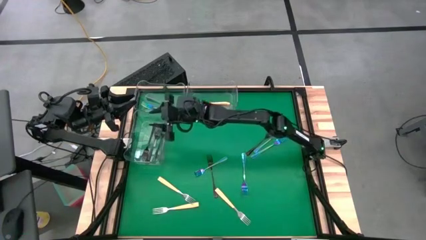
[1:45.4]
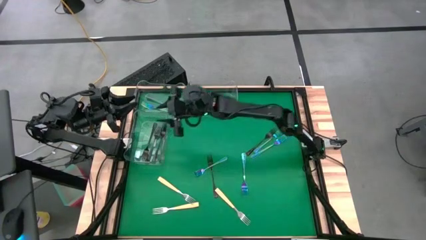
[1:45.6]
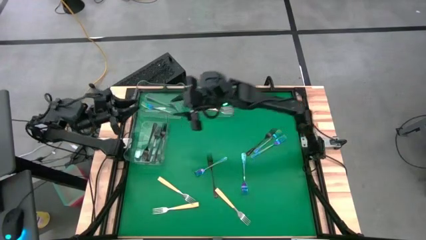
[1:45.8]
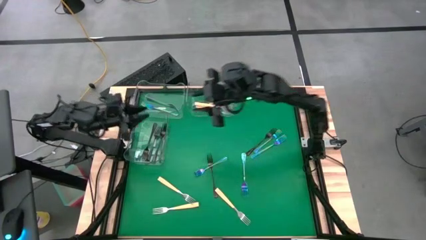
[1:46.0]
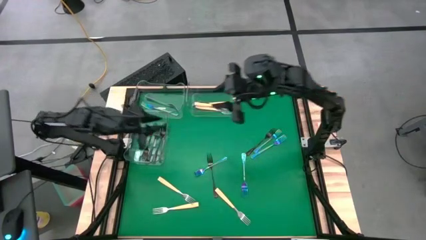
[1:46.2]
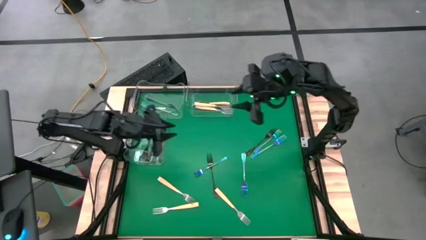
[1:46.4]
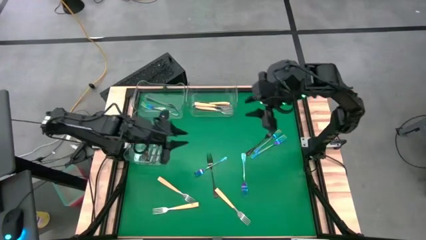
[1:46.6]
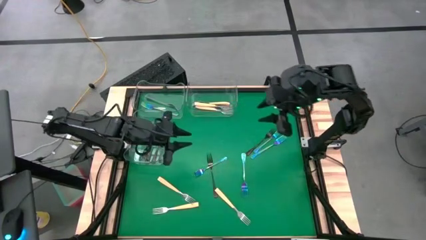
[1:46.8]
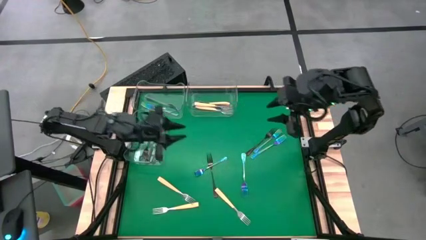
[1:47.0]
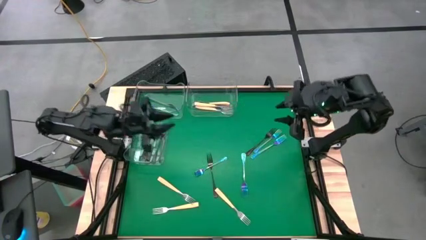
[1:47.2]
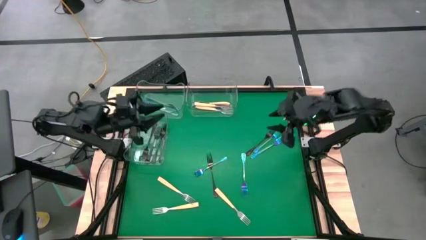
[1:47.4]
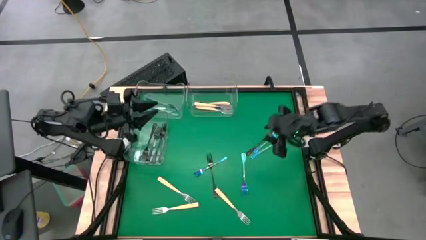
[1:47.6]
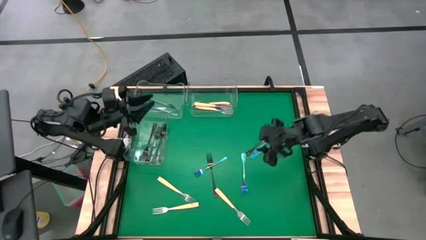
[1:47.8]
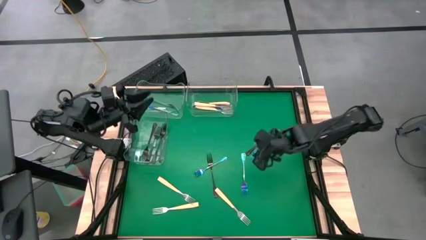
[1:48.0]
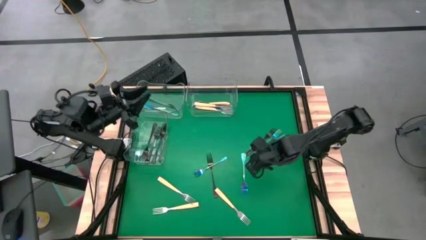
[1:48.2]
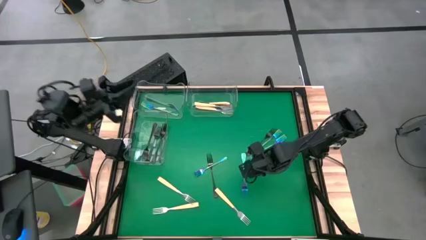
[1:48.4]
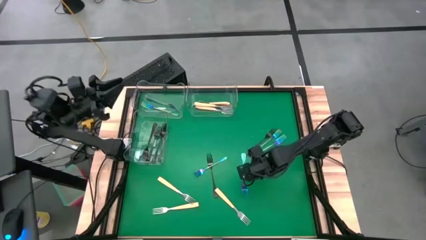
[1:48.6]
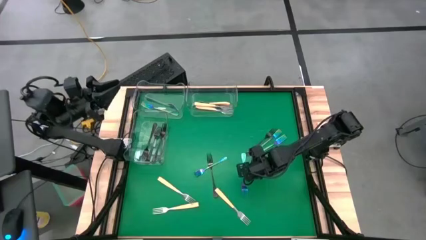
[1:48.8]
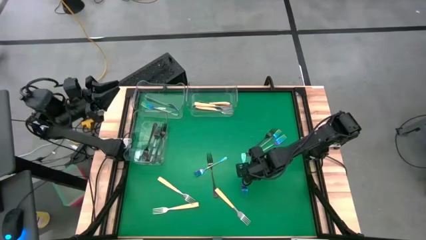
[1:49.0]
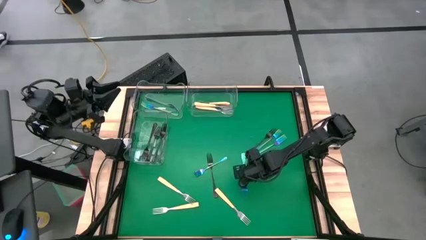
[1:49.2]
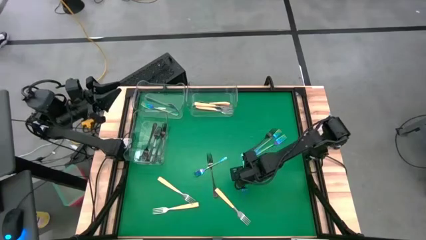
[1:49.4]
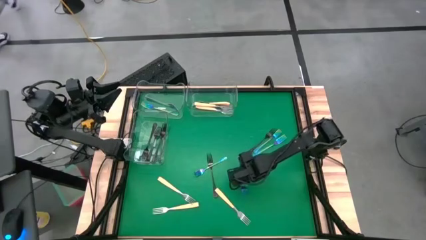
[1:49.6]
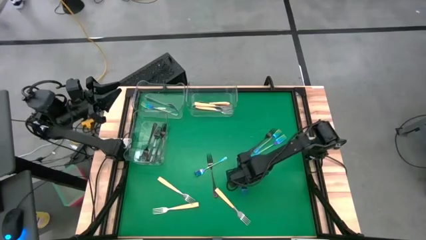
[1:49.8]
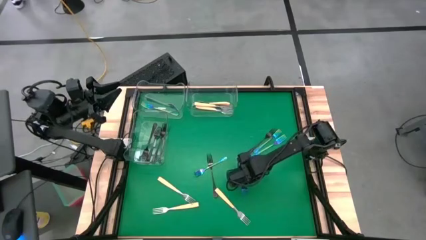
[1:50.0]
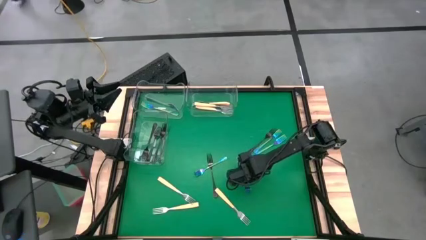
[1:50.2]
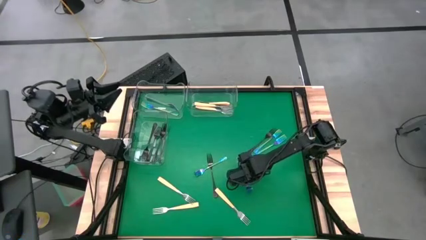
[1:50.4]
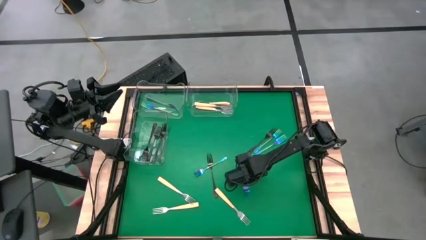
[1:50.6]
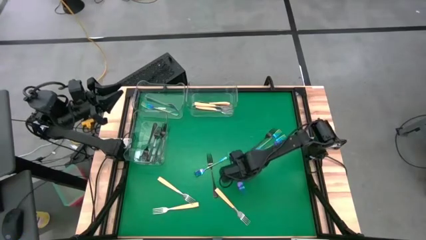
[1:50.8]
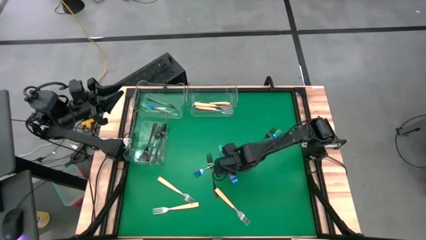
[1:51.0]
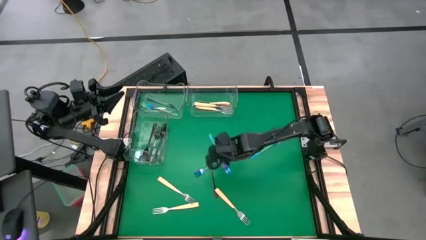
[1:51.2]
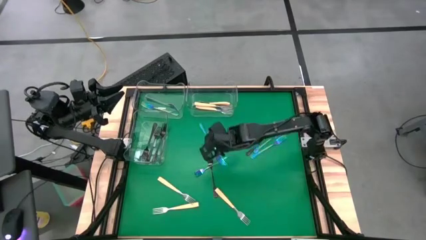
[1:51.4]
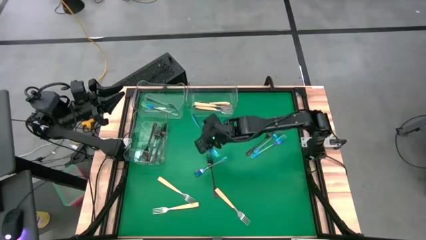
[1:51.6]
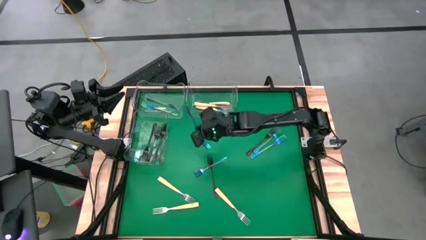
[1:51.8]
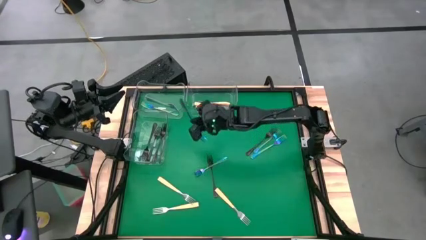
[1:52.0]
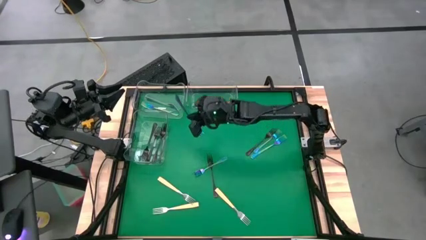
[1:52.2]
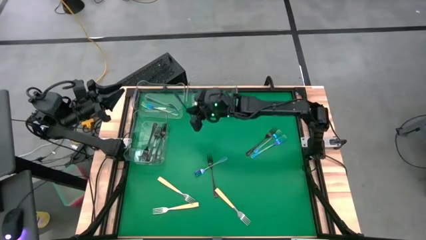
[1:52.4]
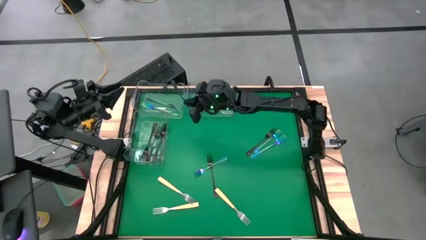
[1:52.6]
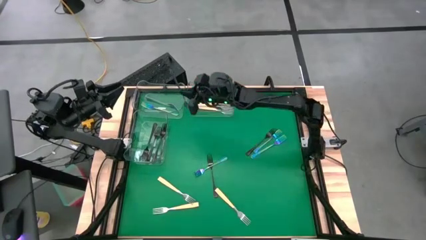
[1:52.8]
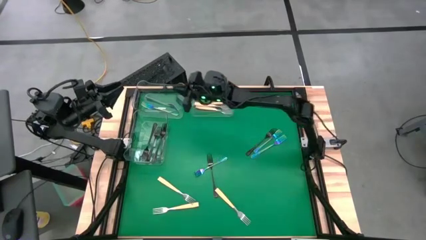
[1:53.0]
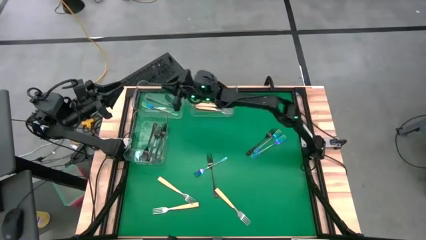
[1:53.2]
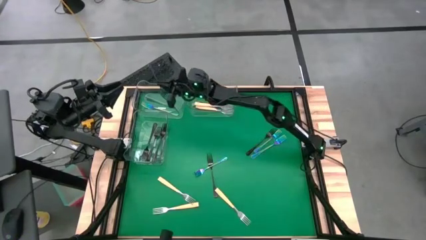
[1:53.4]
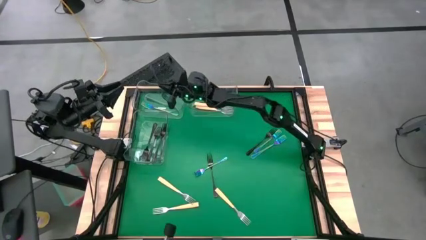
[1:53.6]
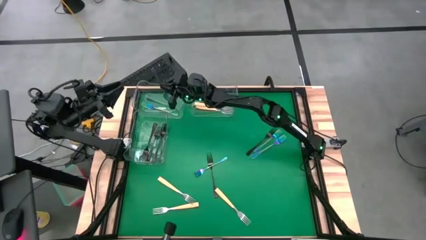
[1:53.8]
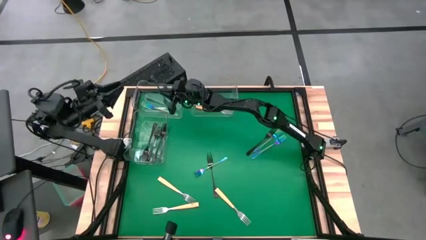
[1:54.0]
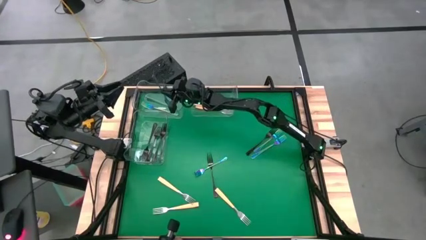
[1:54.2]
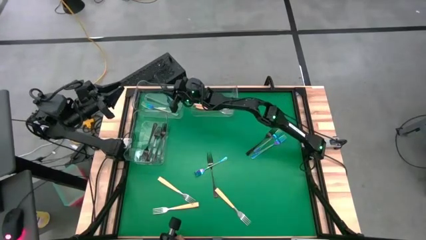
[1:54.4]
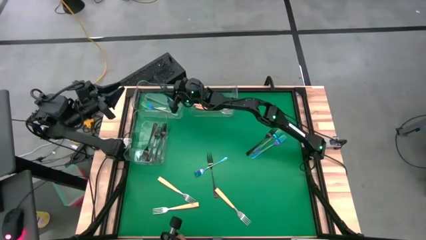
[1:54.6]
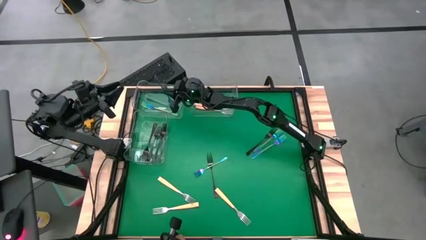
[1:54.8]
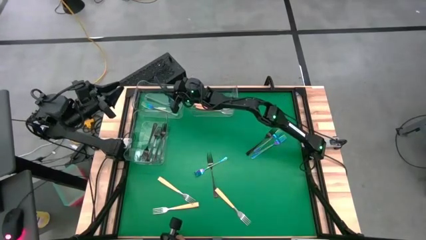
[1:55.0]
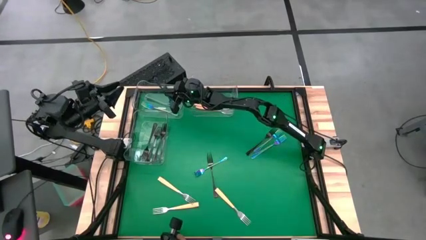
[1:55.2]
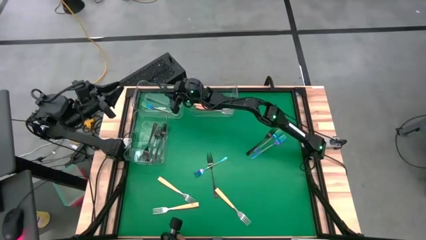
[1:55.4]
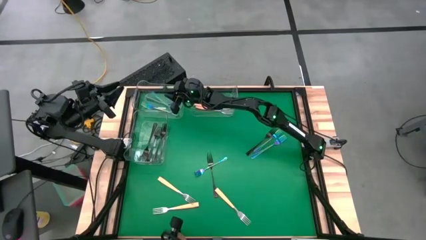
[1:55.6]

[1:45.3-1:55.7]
Task: Sort silverware by color (type)
Put the iridescent fork into the top left transparent bin
